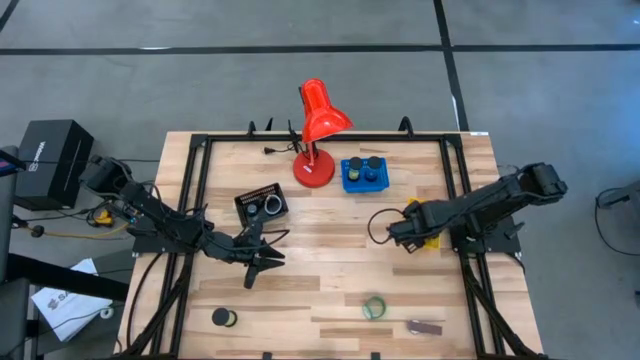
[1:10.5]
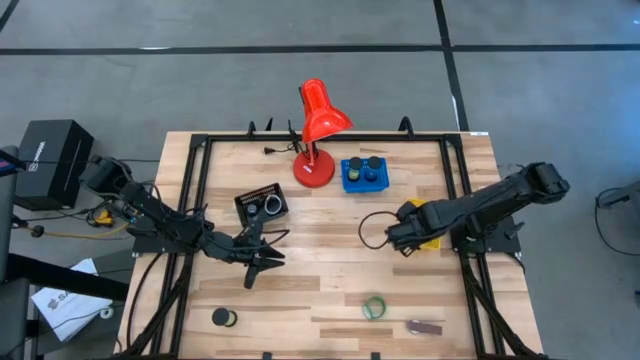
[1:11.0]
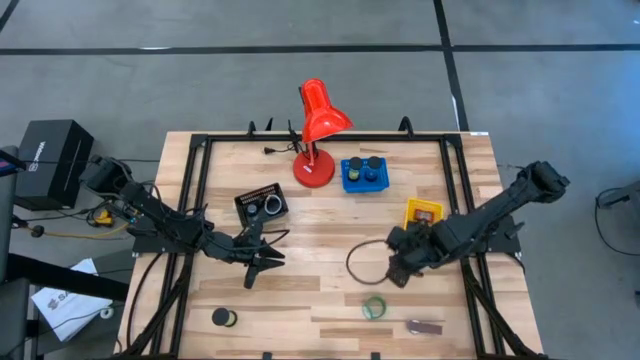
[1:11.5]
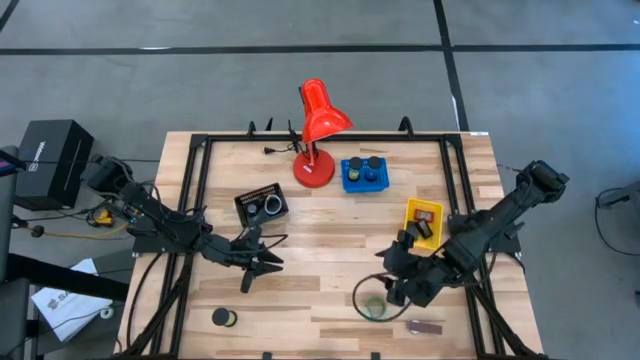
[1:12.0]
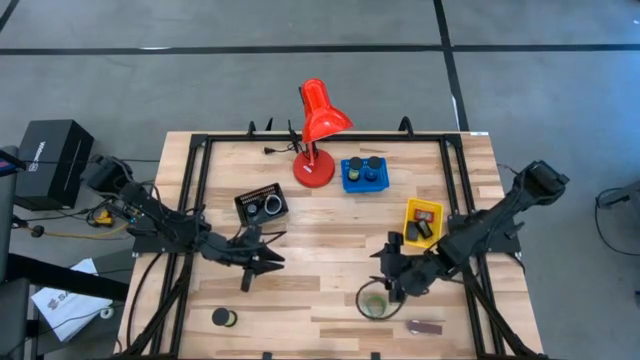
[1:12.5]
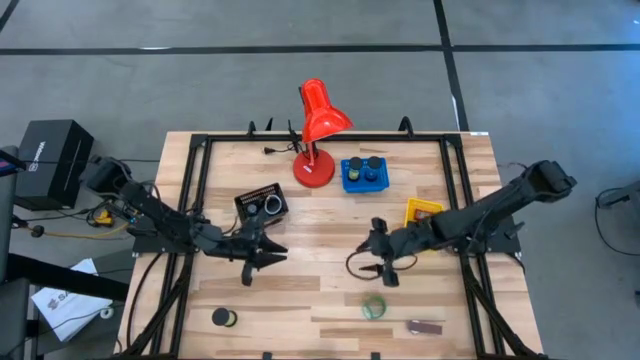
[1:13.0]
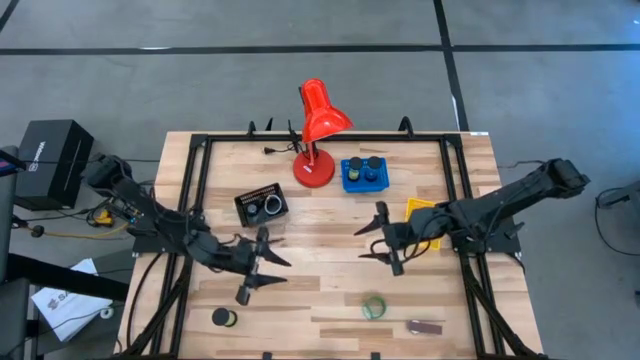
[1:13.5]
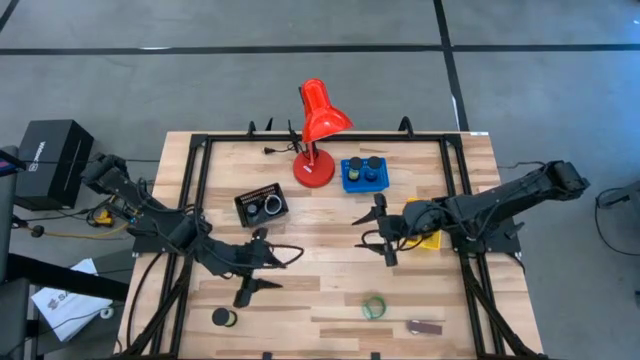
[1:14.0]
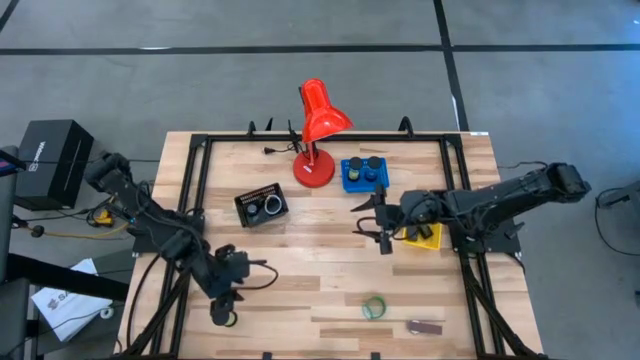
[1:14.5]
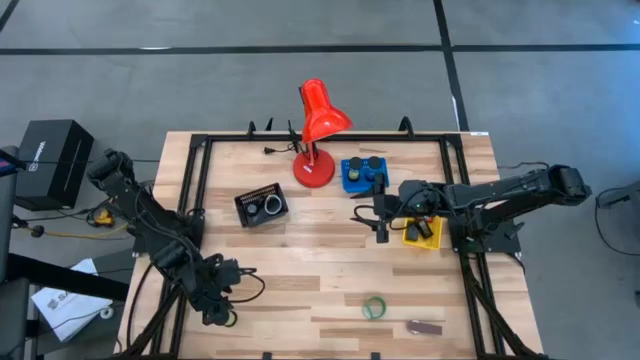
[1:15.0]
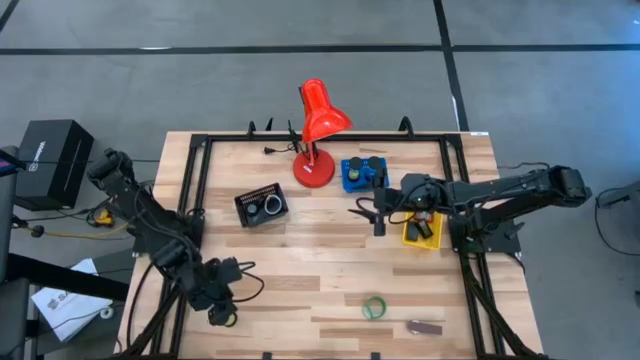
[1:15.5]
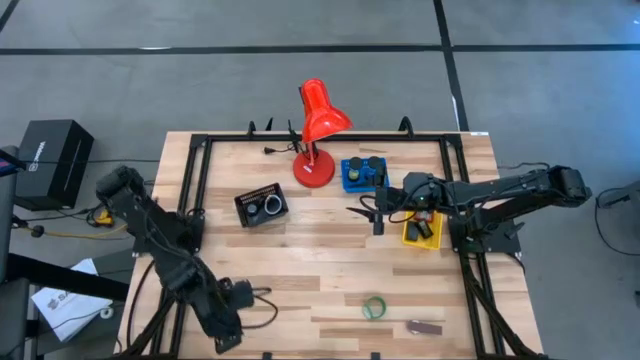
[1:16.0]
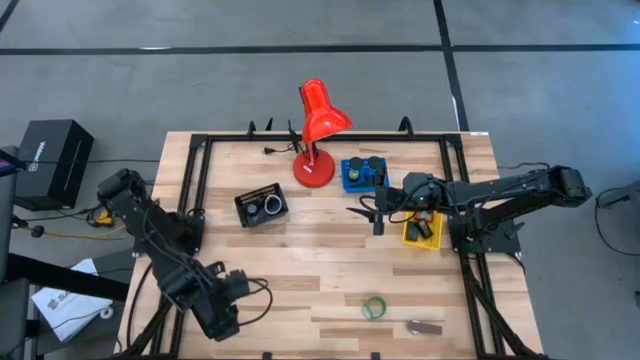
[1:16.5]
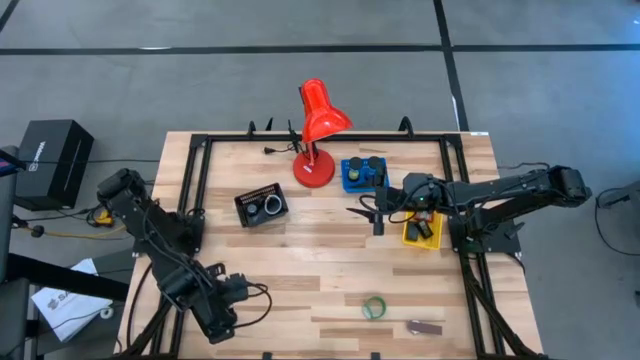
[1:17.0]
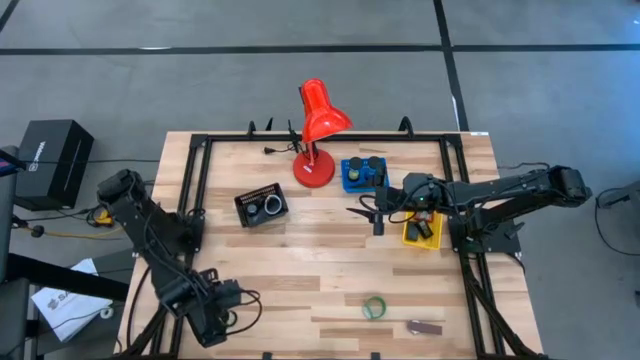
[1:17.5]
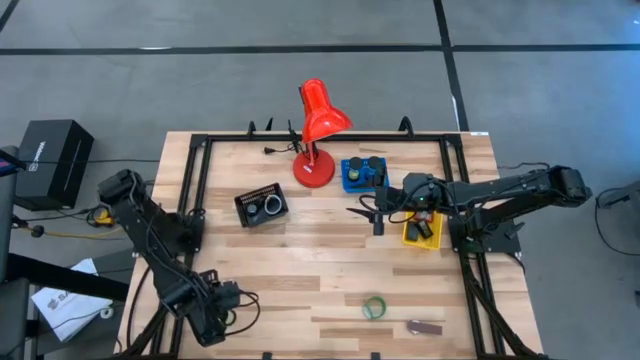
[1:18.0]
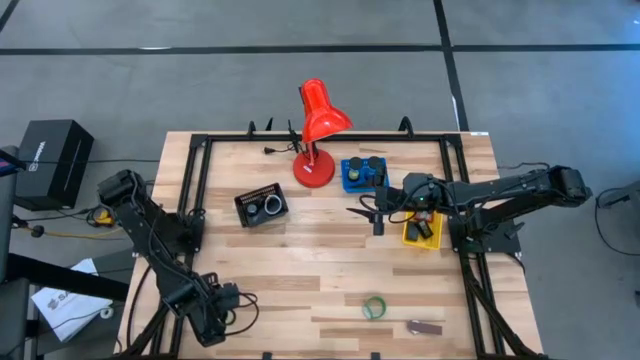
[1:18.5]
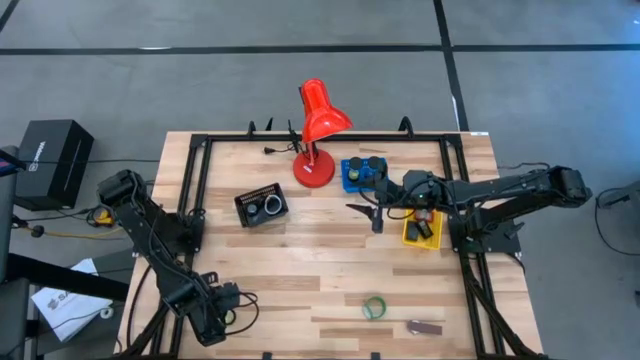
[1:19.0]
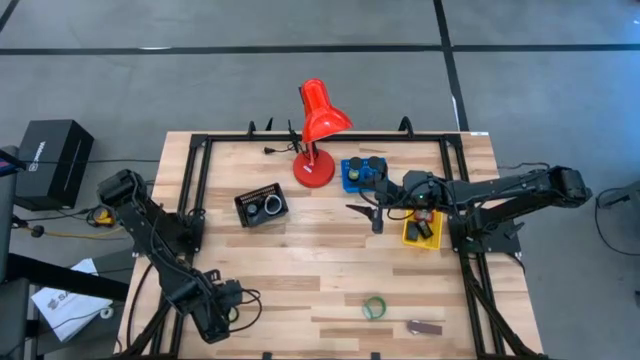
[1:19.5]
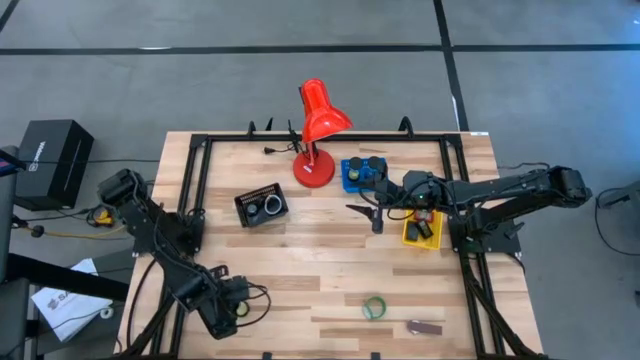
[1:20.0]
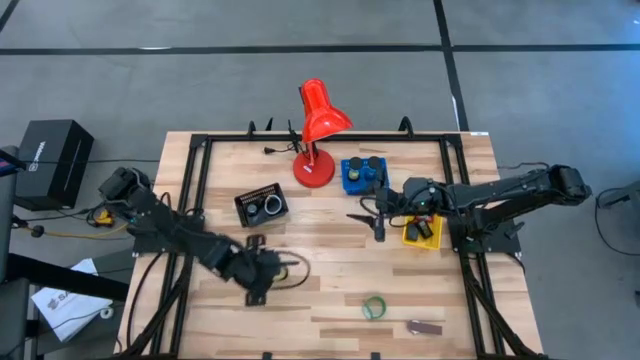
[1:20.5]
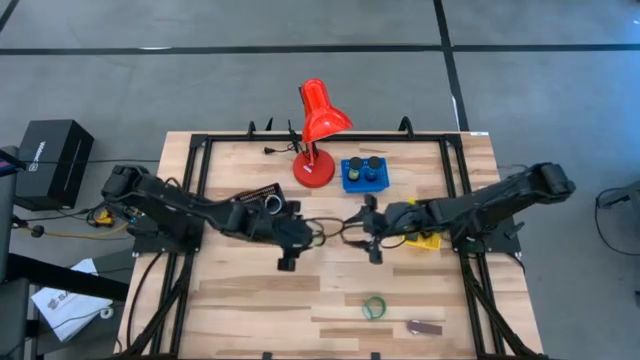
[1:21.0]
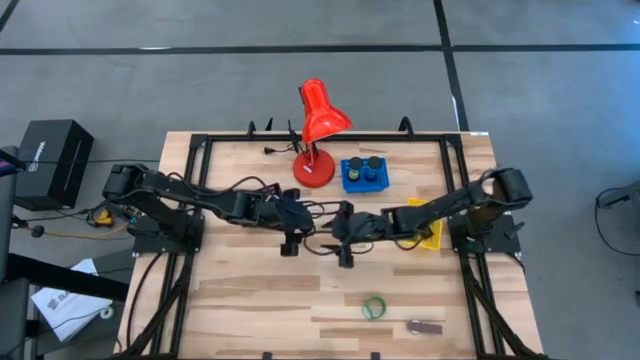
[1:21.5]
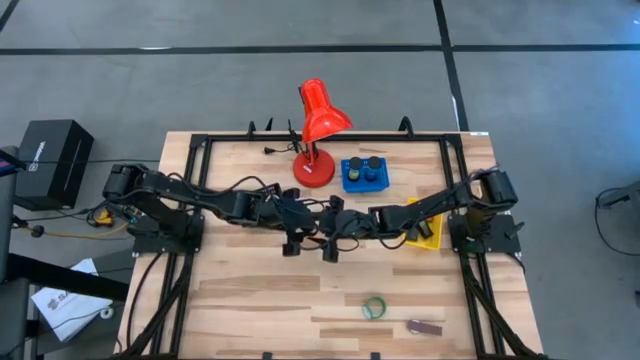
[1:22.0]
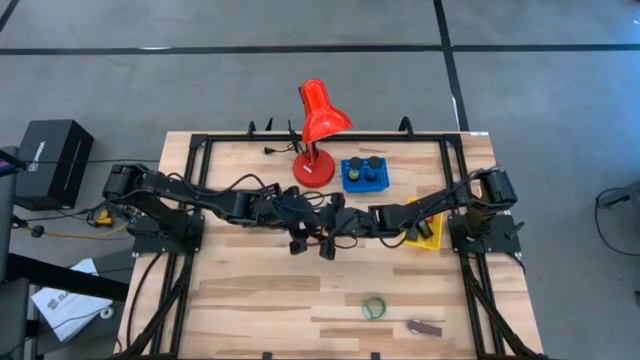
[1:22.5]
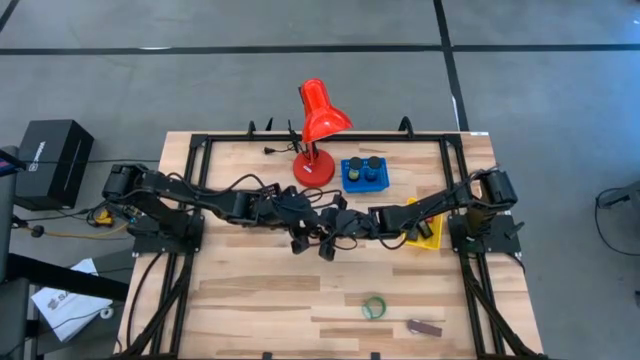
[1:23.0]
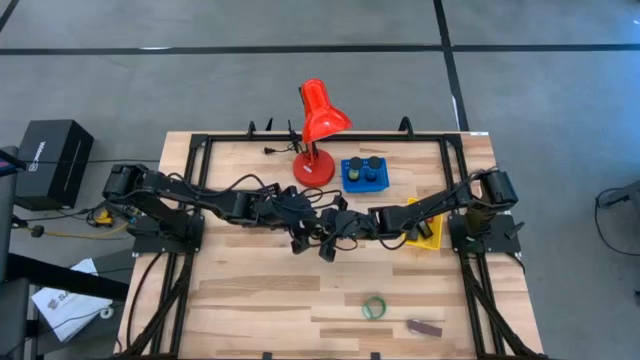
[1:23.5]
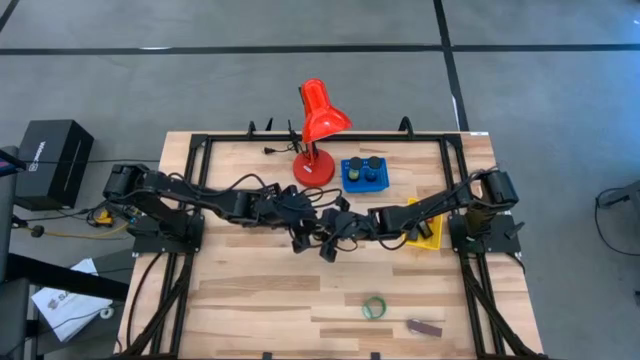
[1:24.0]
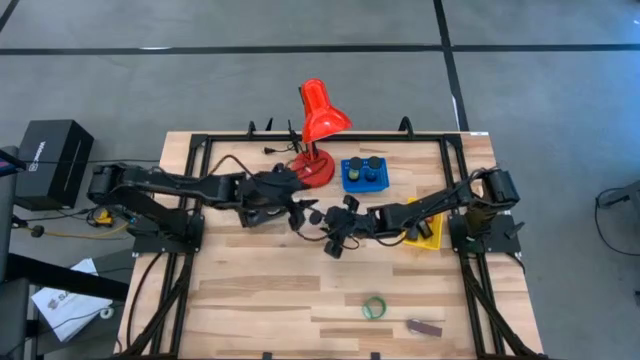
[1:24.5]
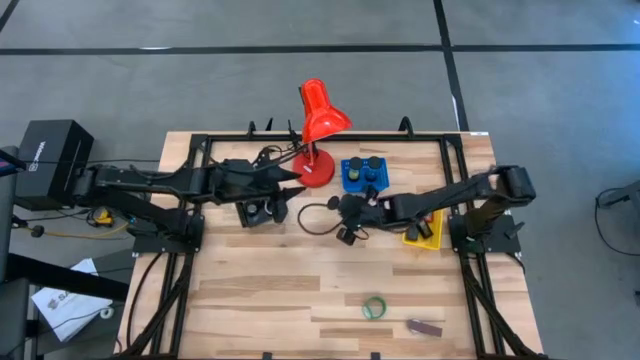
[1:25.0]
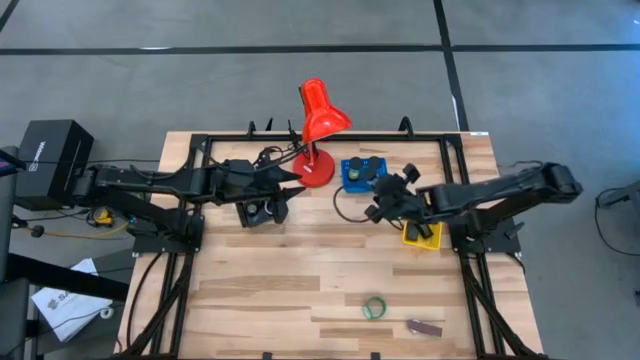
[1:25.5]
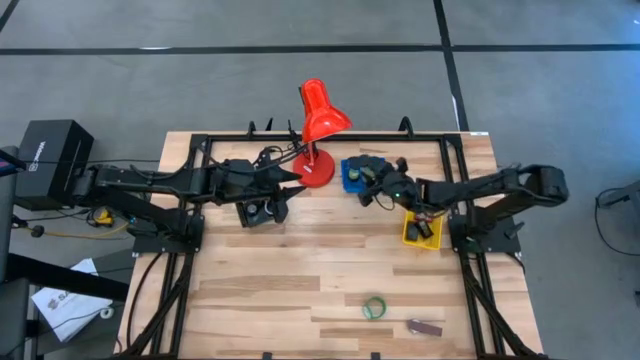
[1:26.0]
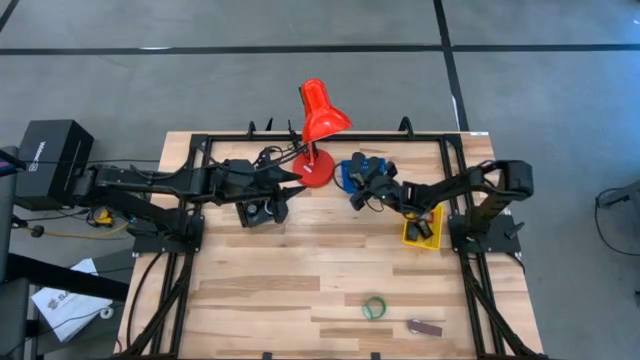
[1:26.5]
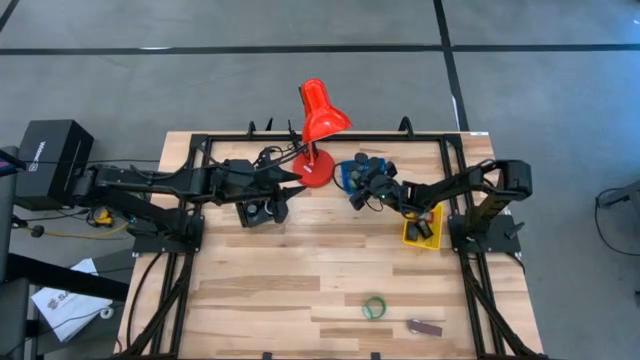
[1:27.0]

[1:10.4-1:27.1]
Task: Pick & Place Office items
Put the light green hourglass into the blue basket
